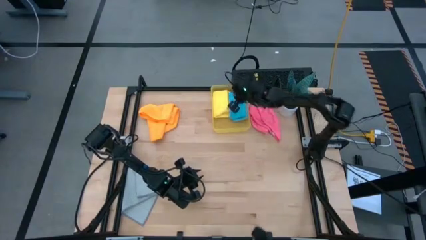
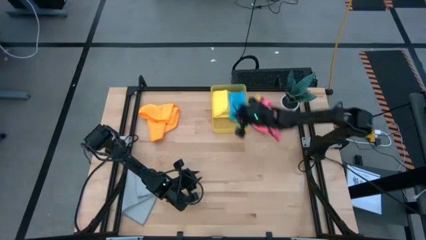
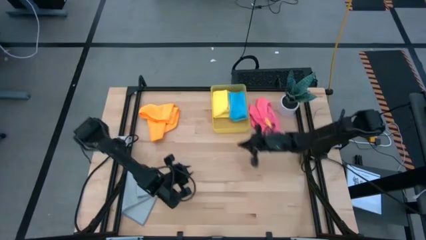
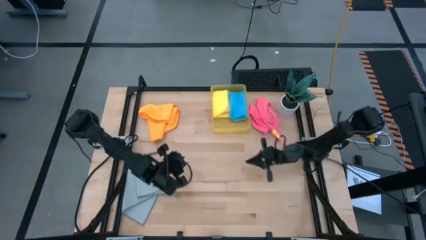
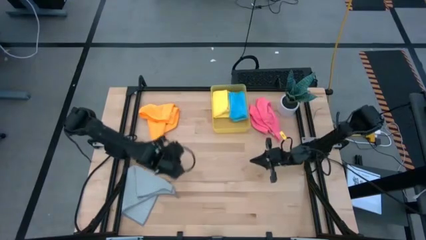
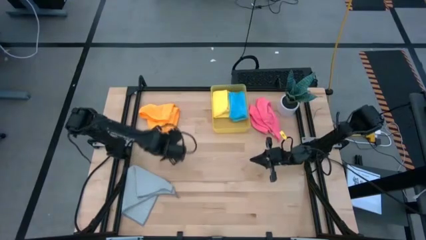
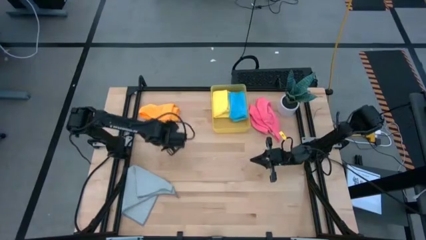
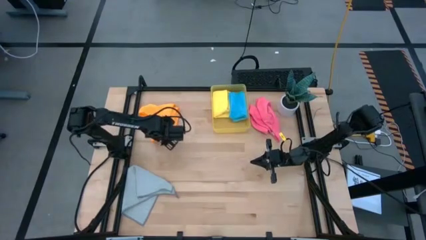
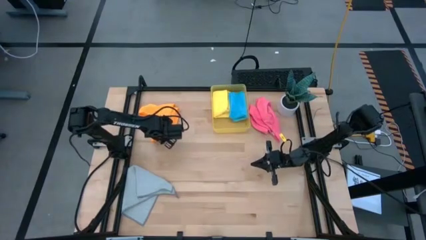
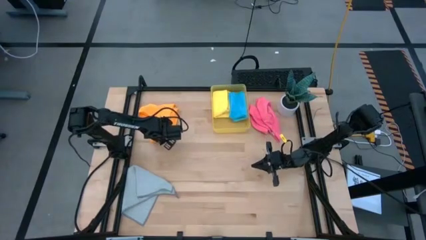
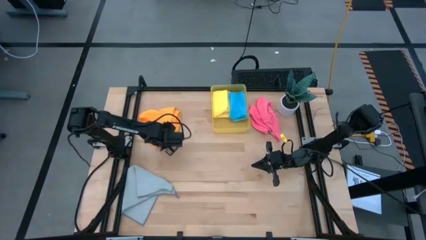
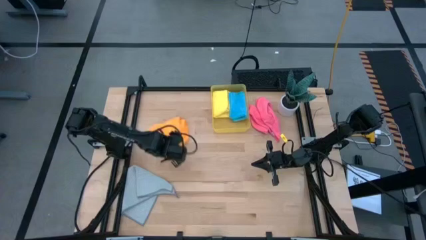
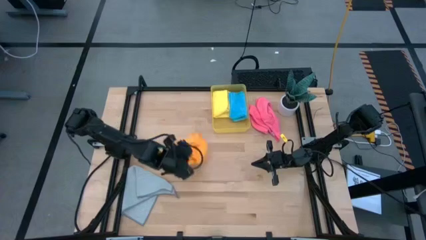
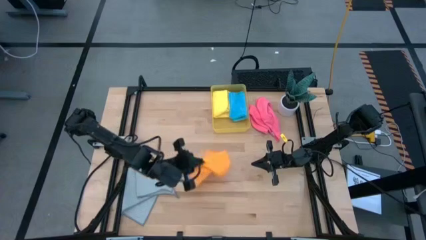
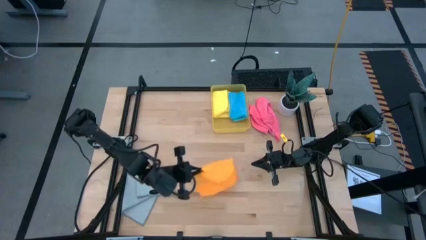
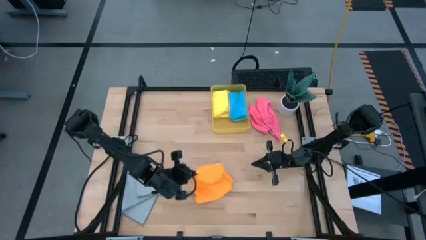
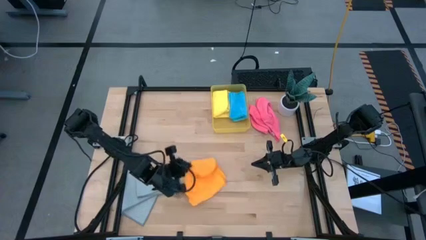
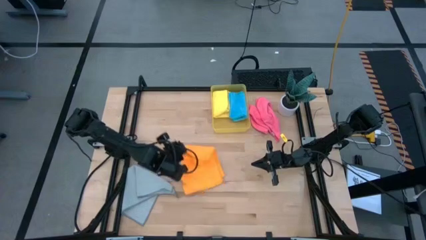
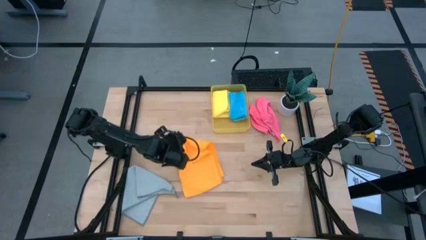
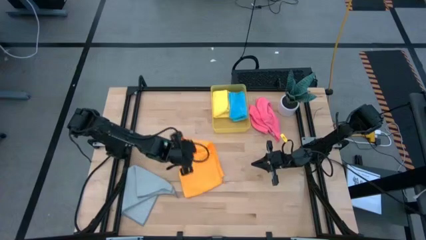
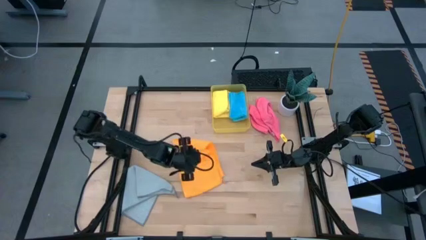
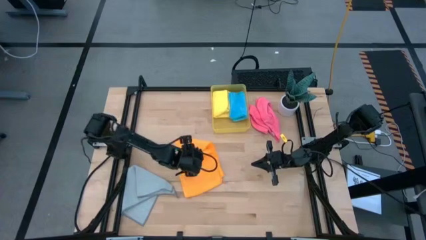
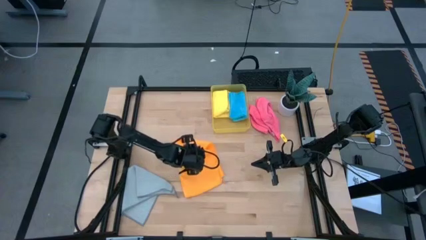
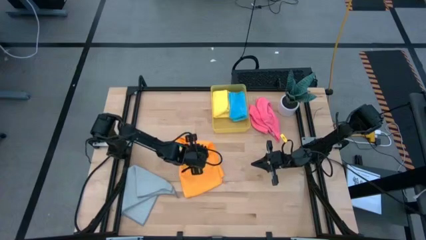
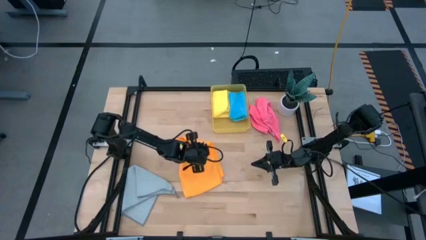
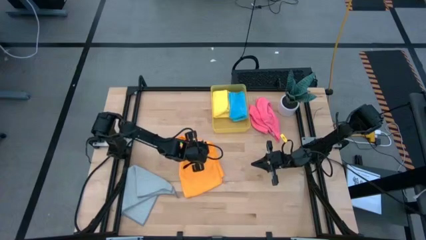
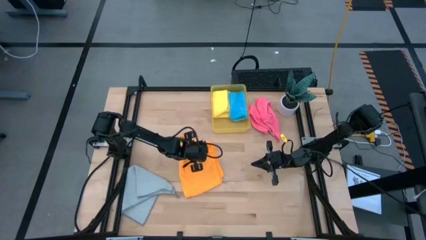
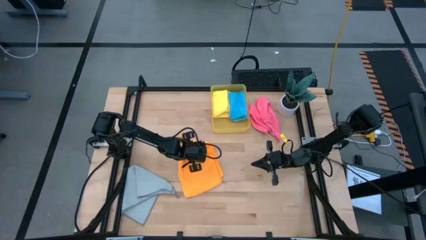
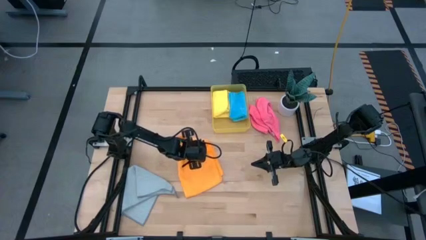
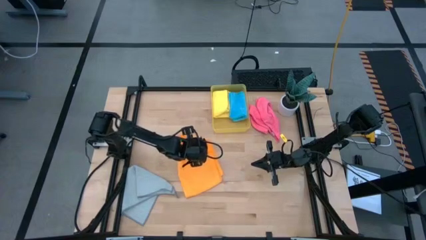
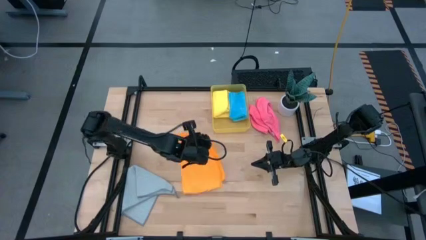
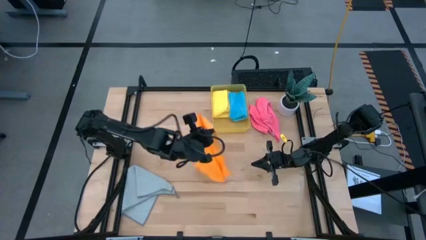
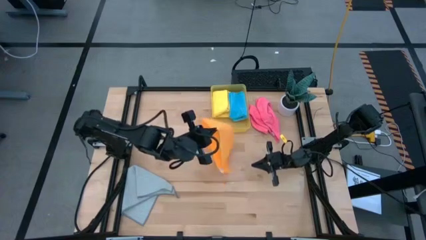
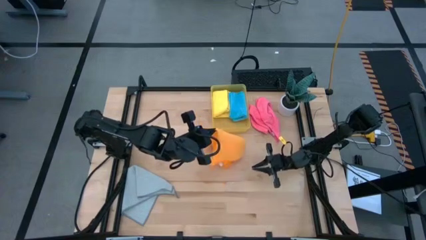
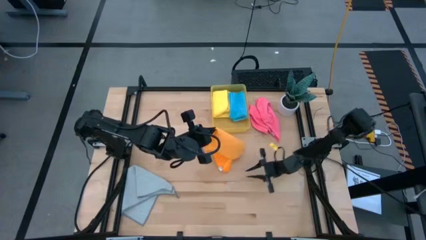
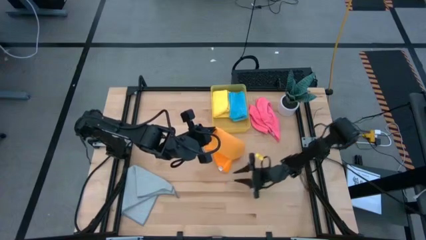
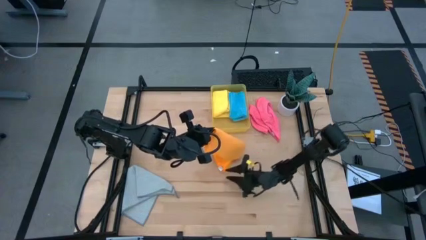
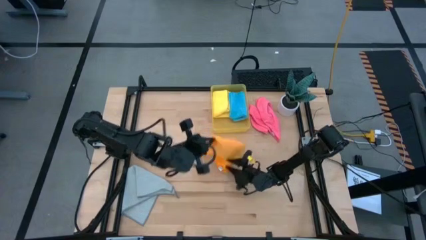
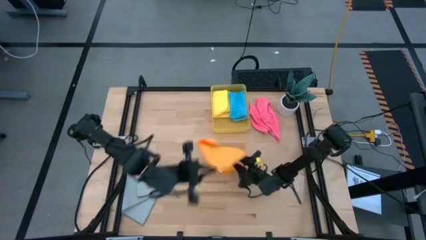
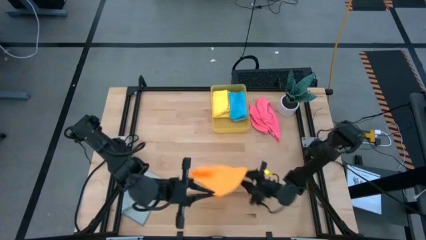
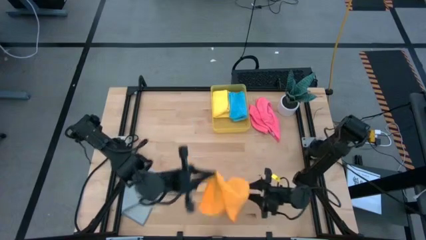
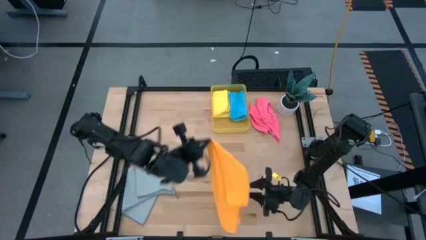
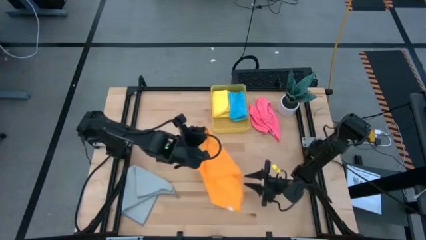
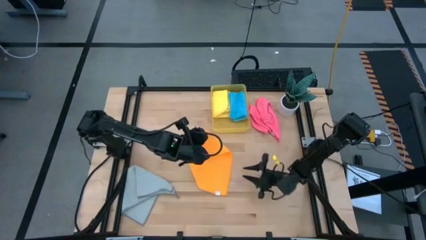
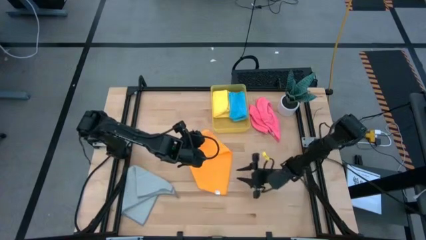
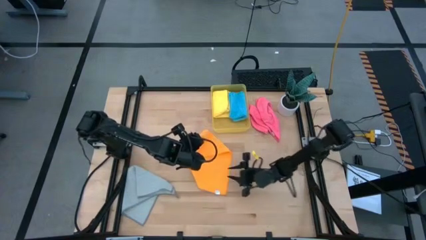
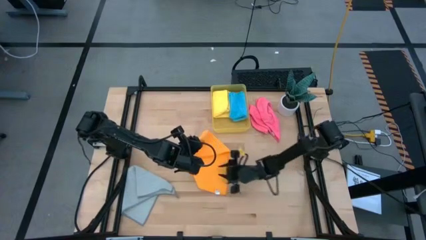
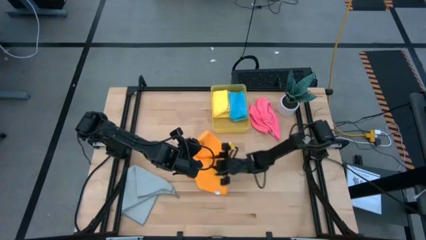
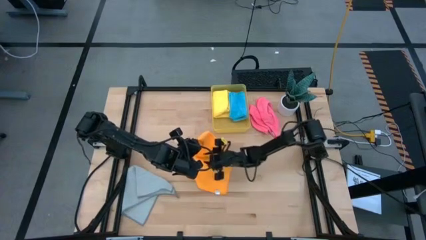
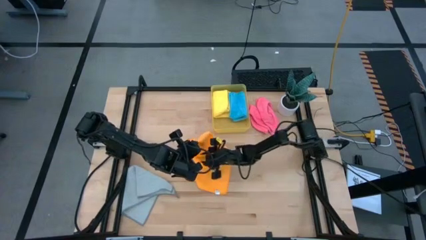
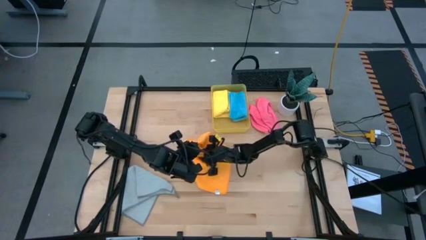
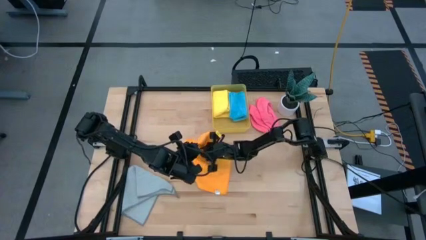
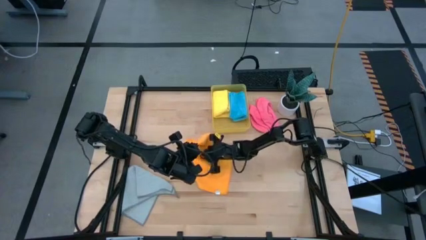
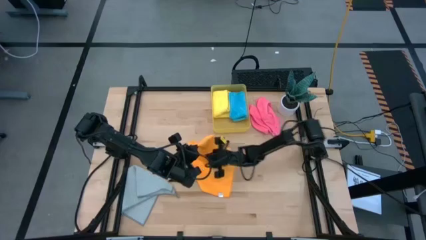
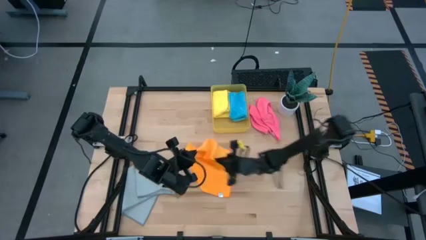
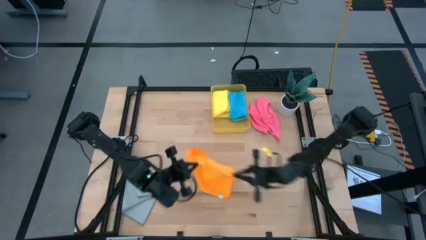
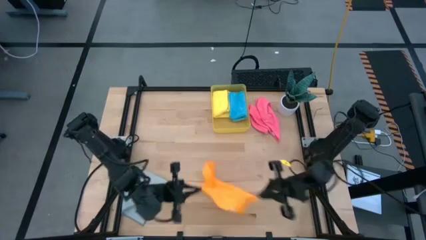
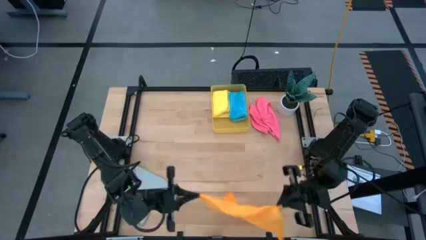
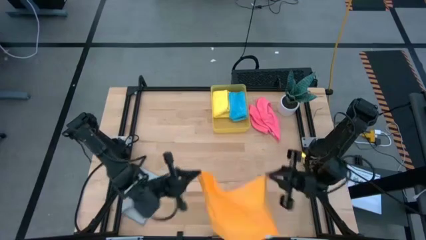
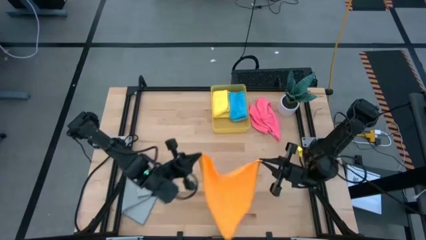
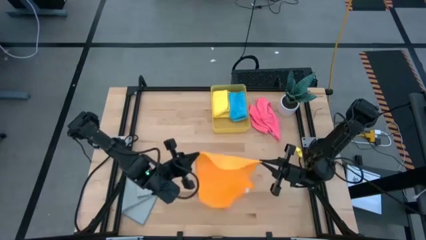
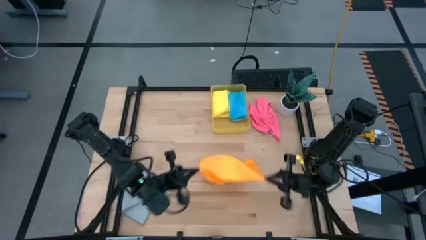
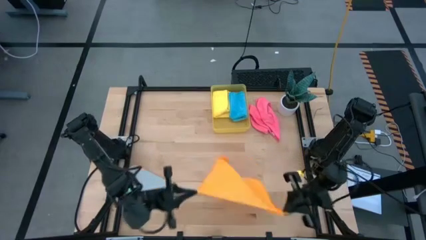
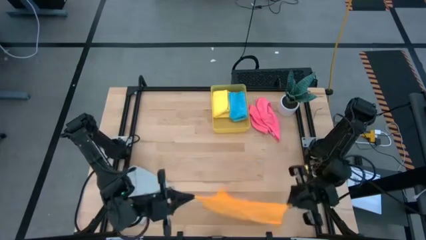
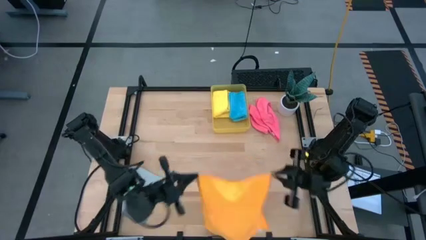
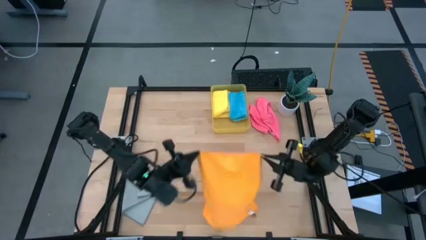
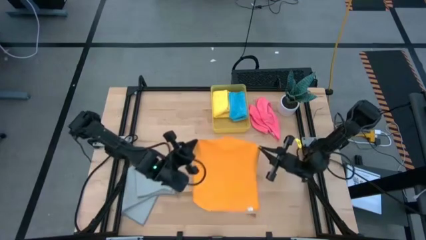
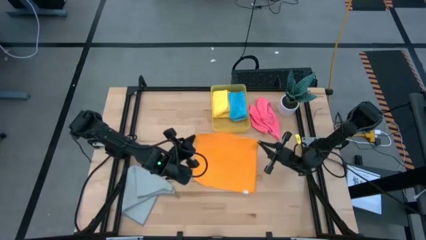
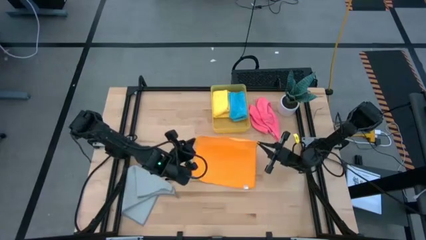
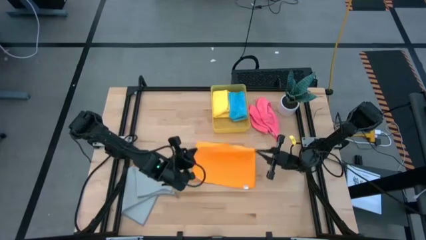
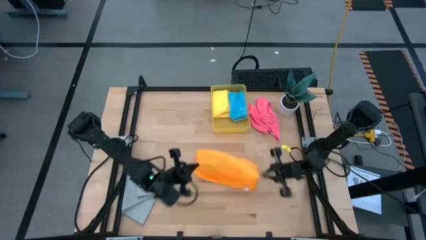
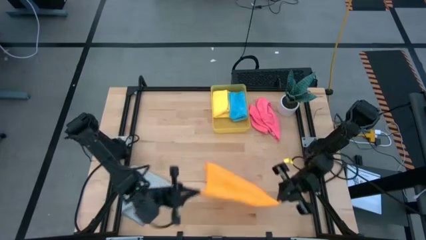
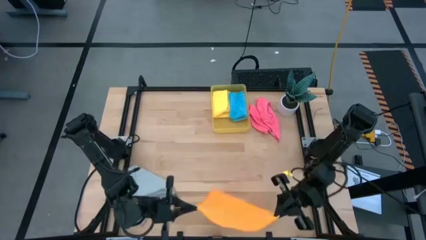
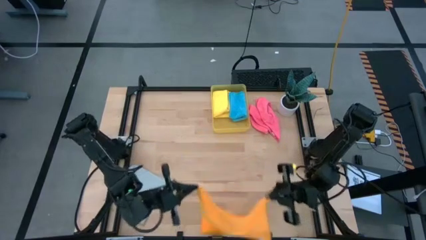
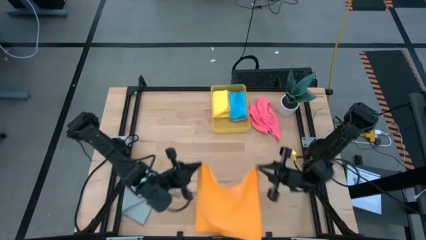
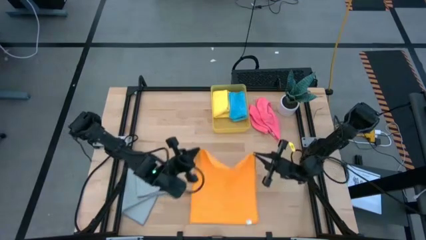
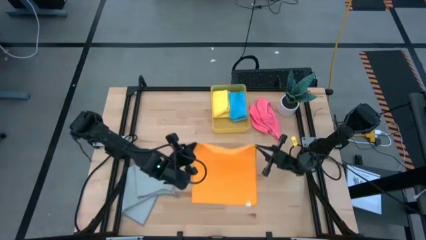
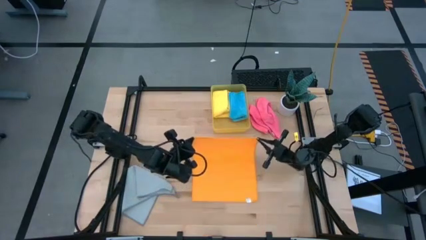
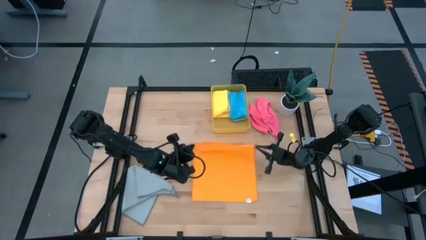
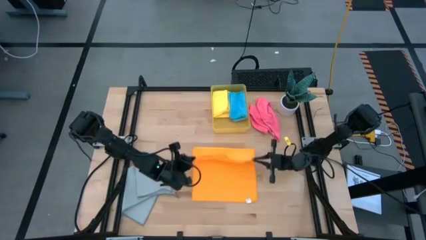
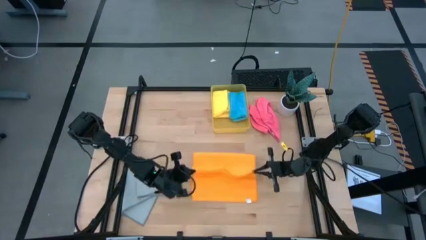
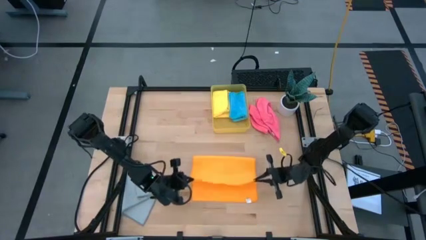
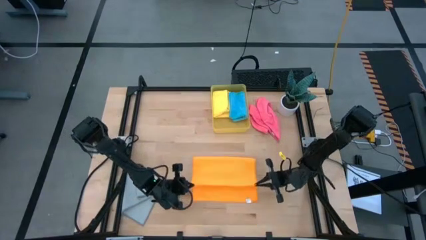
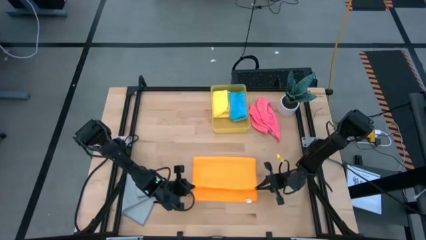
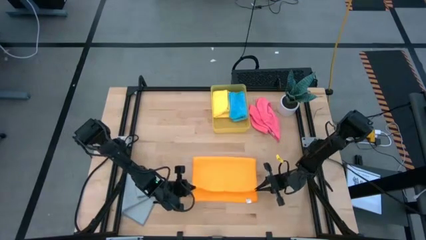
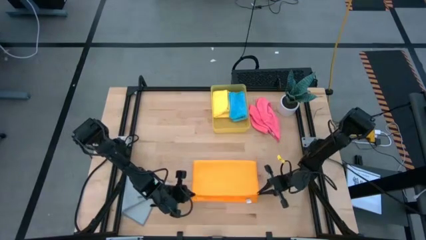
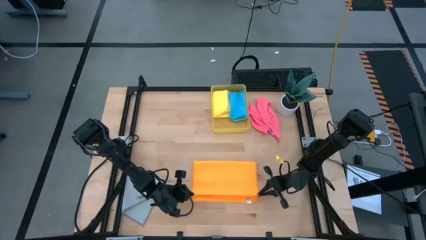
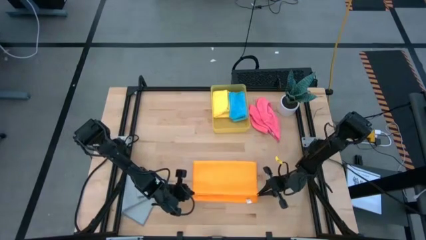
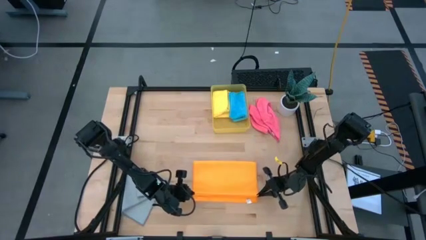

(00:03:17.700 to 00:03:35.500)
Task: Fold microfiber towels
Fold the orange microfiber towel
